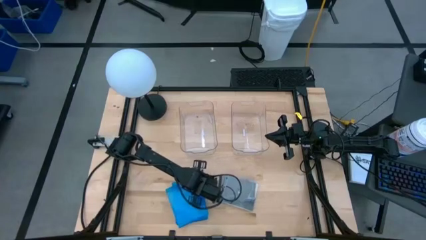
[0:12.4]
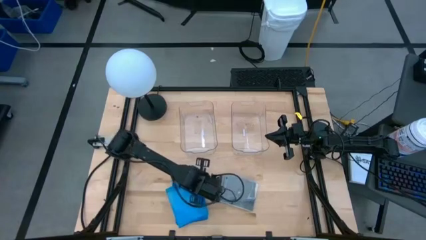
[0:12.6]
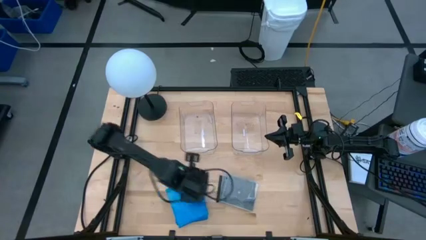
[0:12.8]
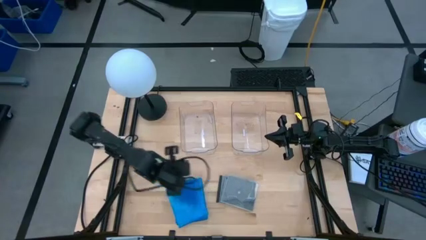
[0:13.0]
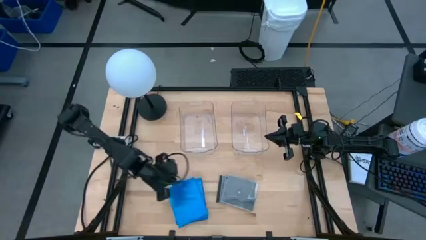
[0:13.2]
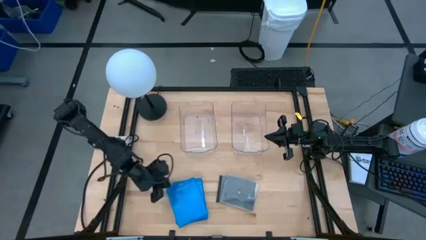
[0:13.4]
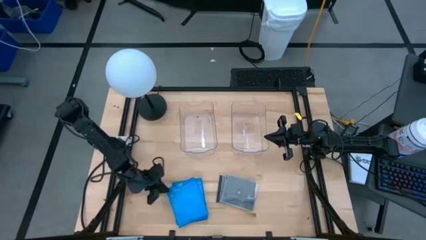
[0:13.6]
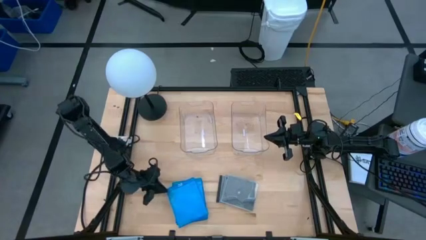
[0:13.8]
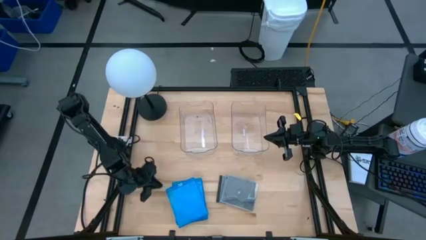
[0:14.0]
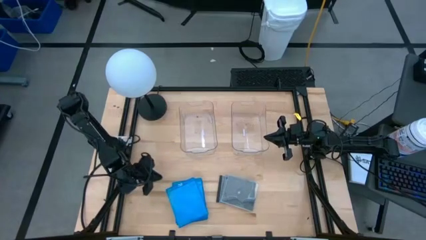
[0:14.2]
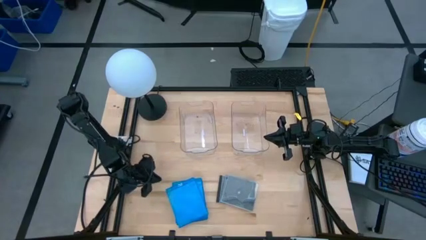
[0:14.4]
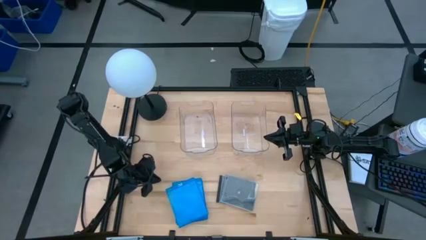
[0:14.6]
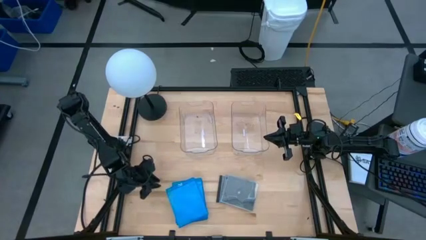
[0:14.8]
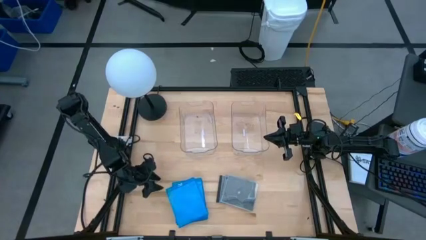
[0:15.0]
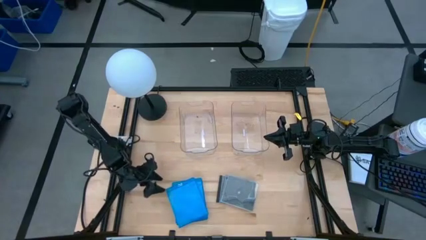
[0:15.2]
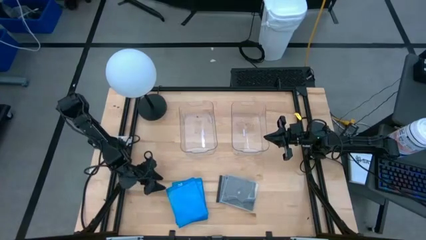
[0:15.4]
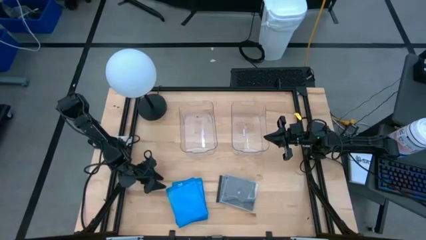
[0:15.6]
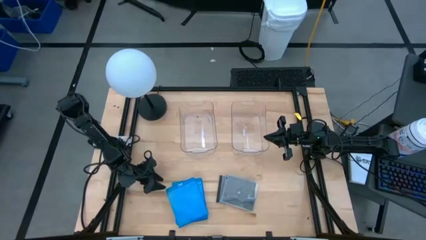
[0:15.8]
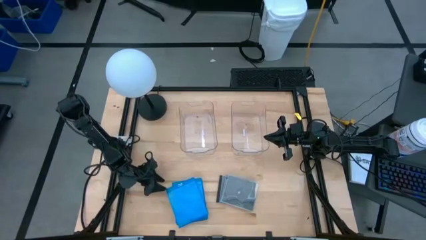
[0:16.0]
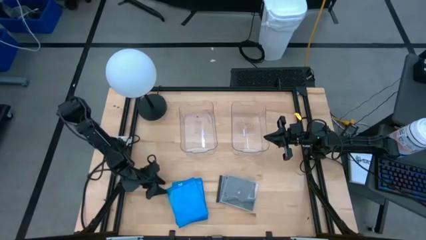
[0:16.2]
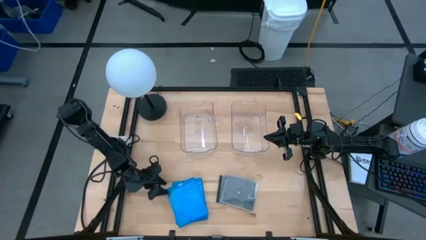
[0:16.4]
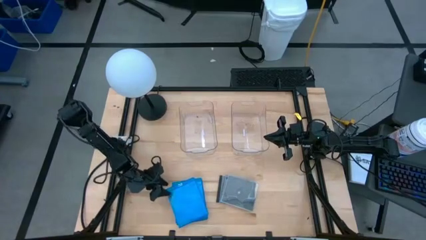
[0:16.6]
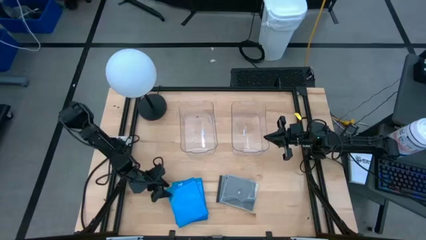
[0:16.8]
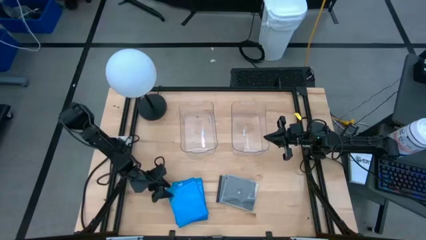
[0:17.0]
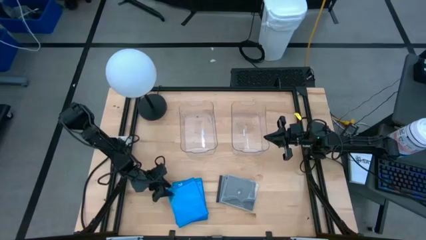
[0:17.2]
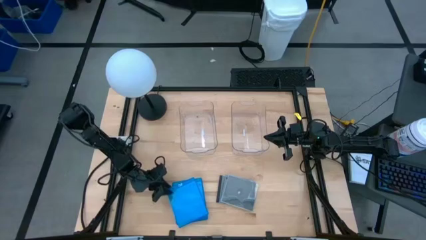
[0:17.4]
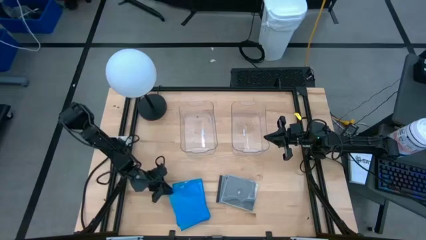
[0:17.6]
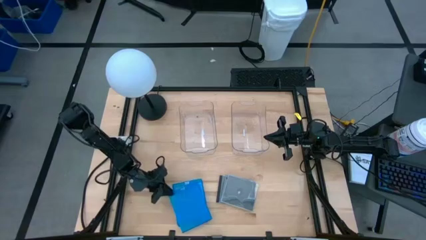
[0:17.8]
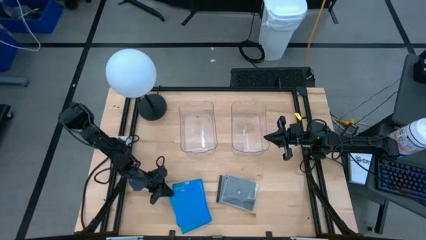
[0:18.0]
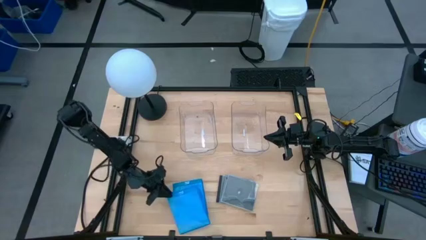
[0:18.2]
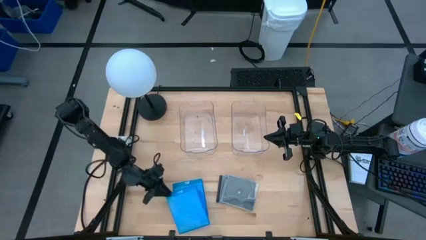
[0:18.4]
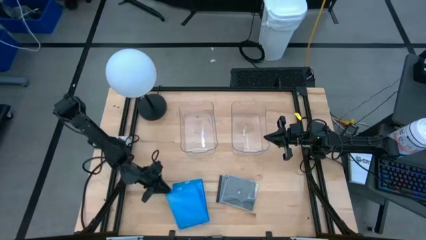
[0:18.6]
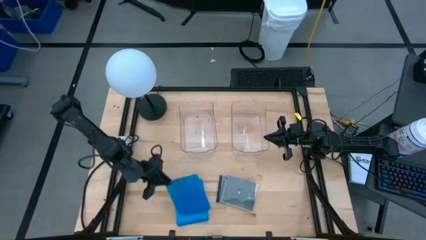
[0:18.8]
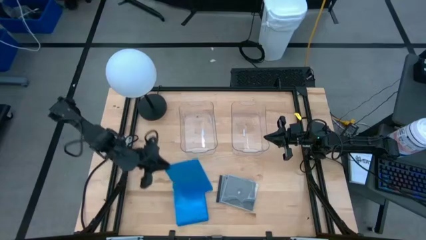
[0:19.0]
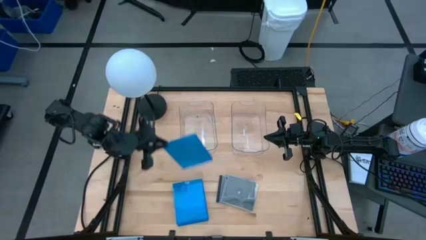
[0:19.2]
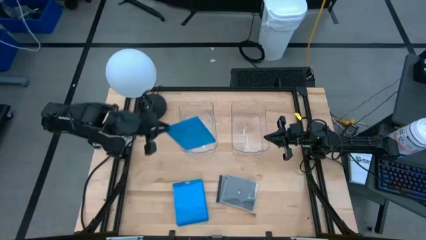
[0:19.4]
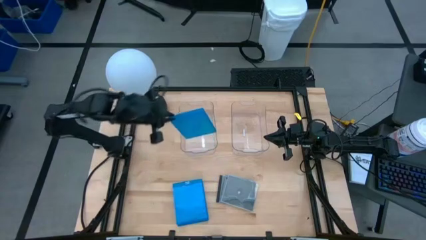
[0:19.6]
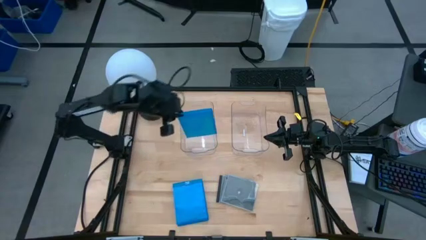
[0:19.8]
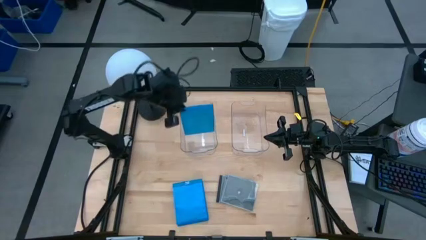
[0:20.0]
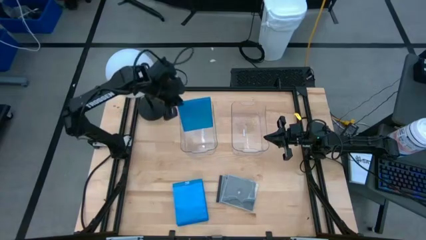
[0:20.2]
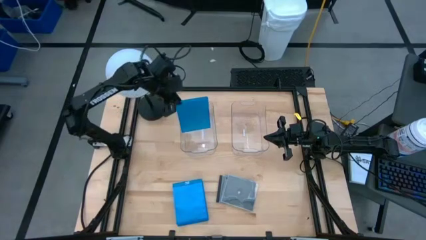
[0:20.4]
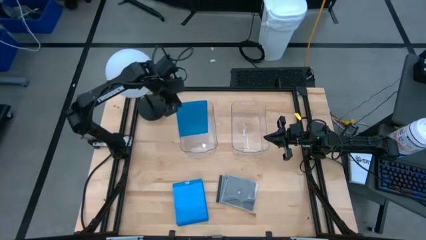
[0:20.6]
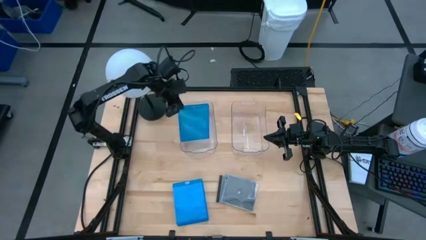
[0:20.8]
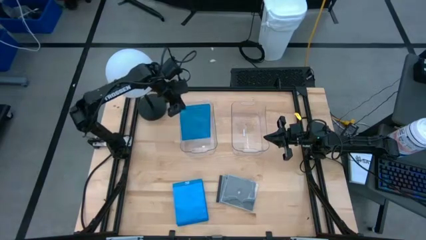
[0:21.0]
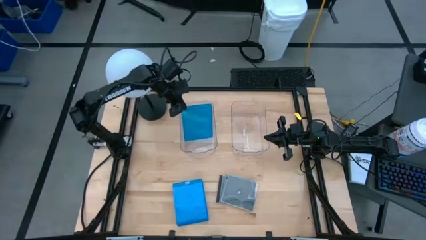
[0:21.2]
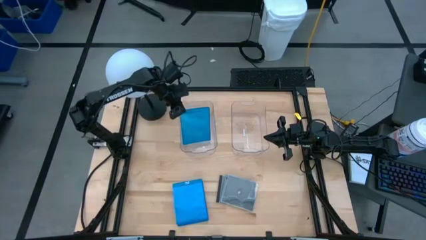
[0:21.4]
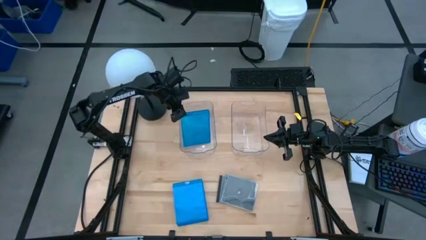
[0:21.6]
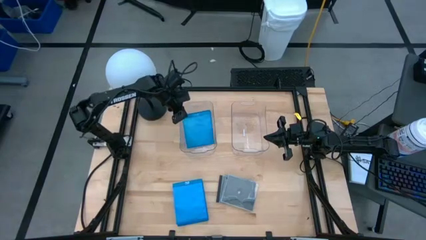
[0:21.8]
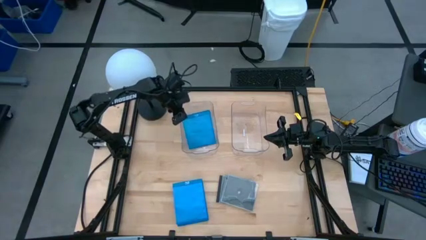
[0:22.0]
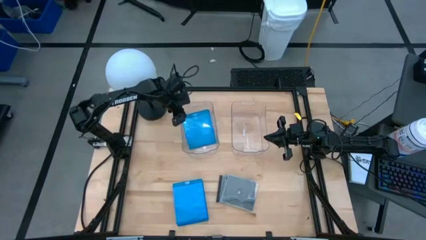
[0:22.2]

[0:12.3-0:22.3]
Task: Pick & place jewel cases by type
Put the blue cd case into the left transparent bin

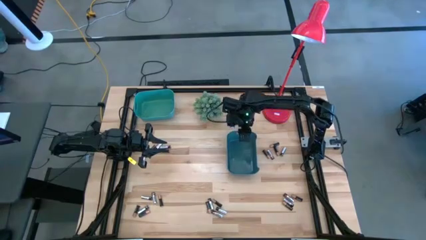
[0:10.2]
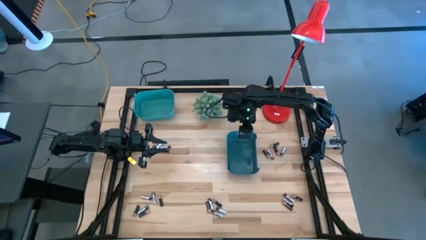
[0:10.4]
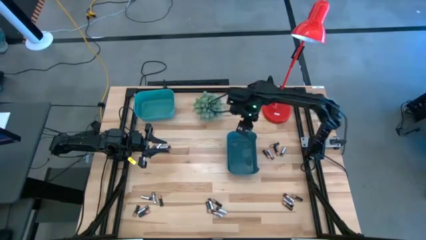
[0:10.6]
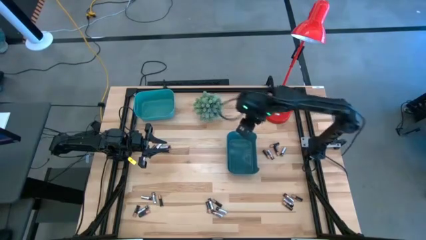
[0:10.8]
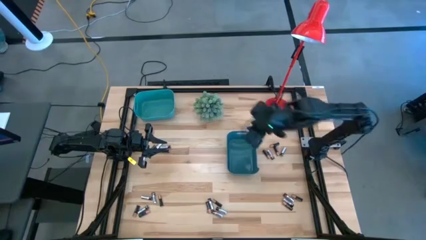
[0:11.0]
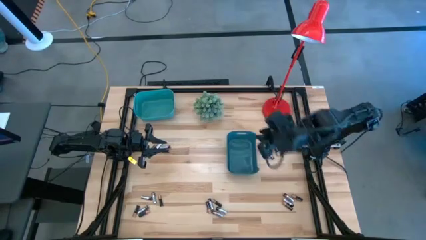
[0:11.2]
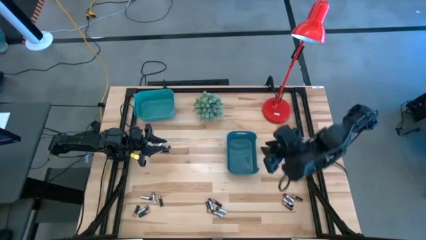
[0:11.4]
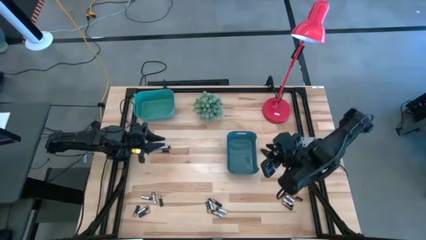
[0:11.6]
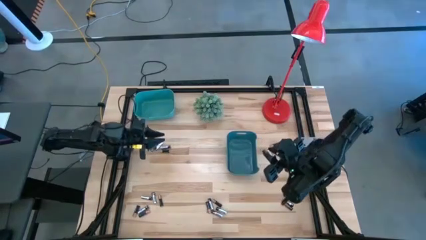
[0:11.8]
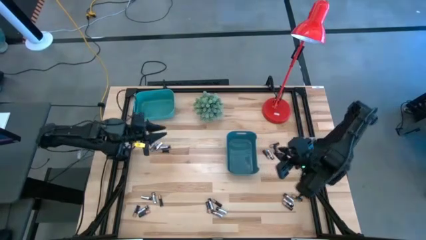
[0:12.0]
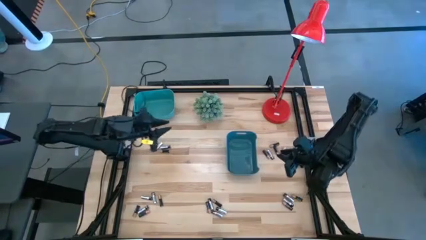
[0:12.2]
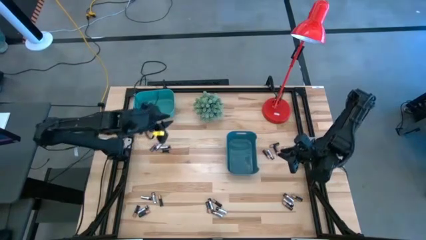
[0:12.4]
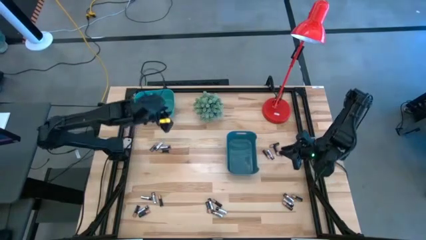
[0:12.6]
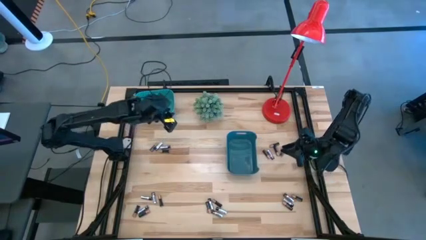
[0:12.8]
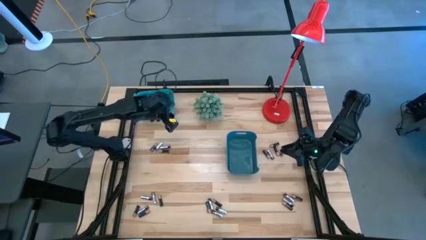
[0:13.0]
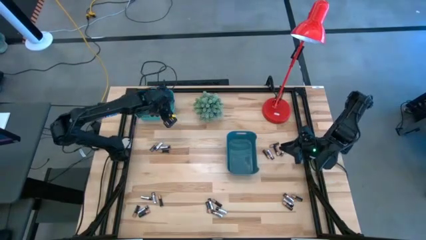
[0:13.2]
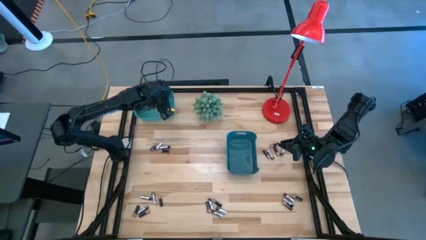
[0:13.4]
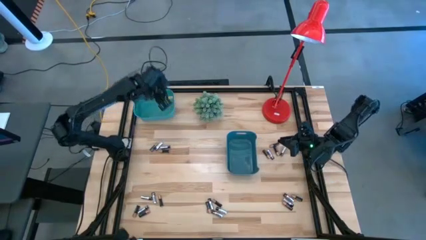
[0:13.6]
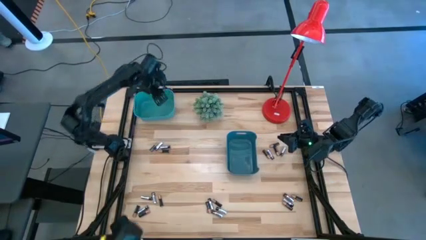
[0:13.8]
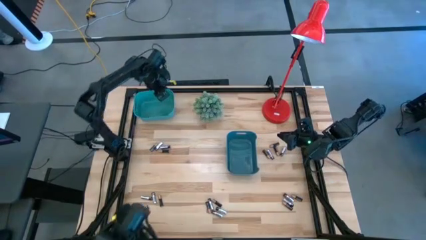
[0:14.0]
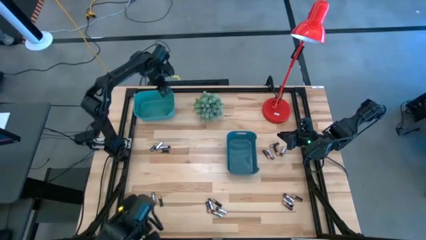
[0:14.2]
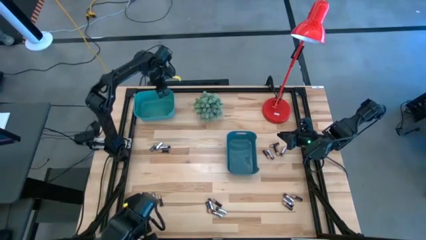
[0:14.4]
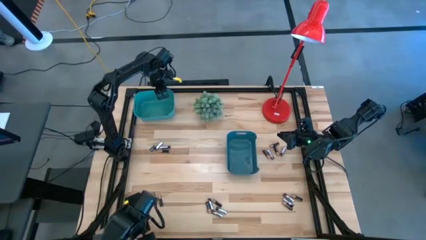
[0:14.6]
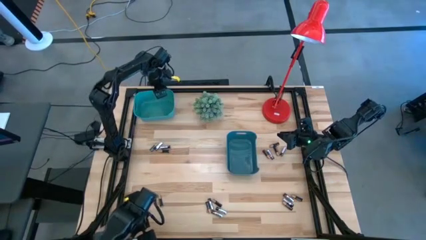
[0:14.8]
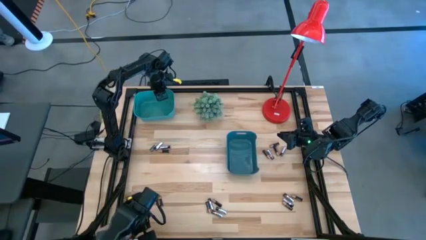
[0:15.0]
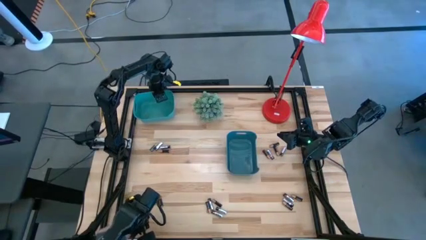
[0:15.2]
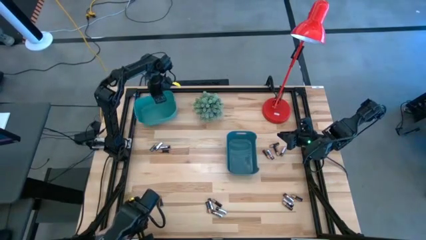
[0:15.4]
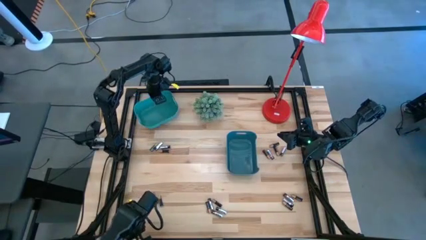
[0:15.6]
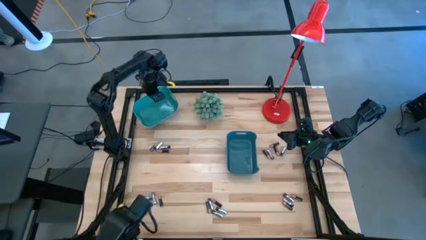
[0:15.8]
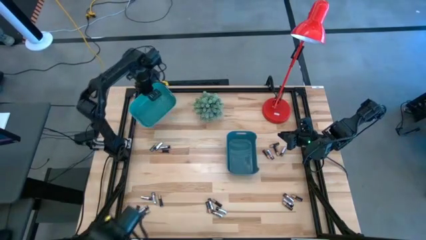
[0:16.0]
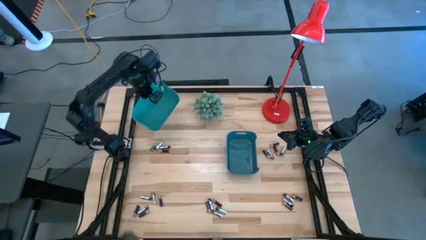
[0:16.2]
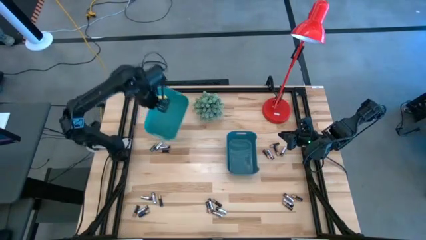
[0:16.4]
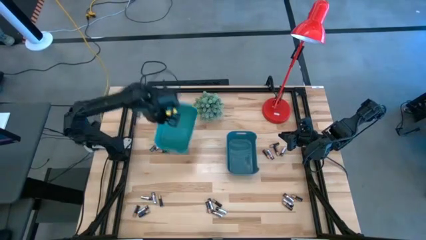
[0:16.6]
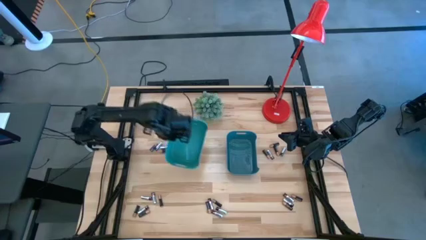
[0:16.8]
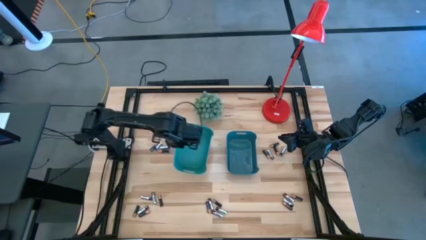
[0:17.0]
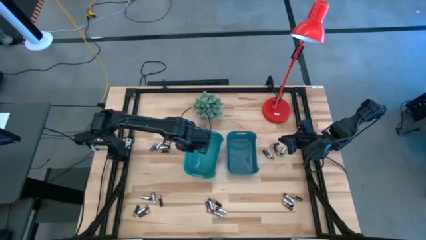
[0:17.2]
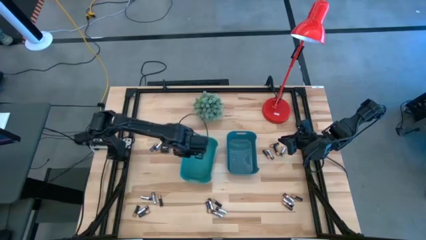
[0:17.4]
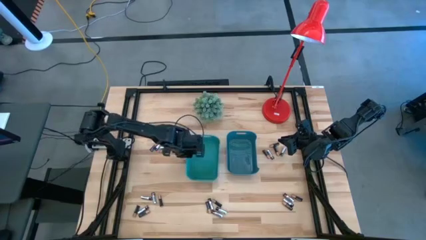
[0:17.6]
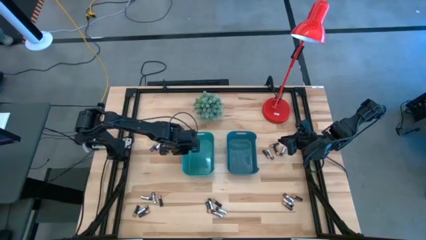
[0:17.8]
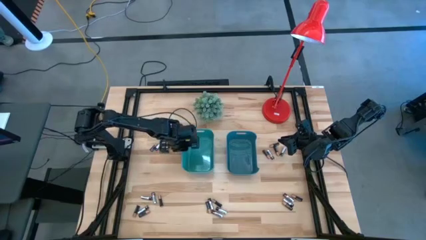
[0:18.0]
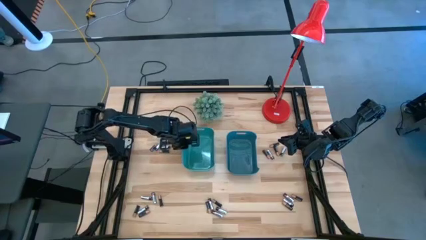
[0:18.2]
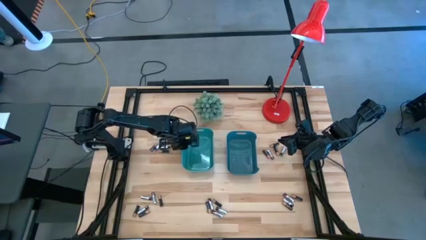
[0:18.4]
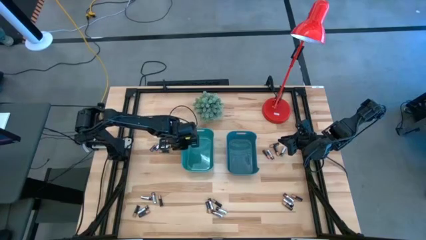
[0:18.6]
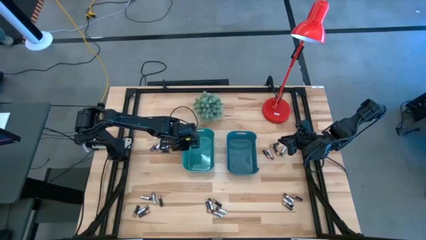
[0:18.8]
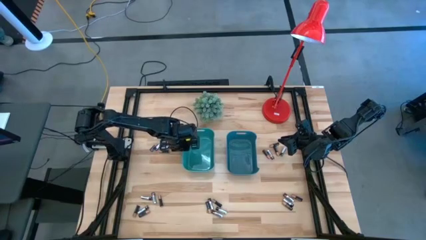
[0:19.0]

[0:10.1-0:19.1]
Task: Sort batteries
Move the green bin to the center of the table
